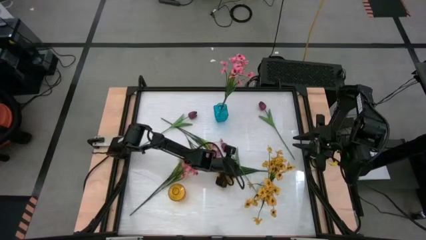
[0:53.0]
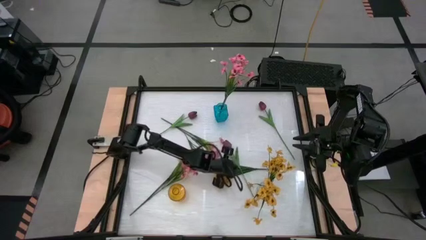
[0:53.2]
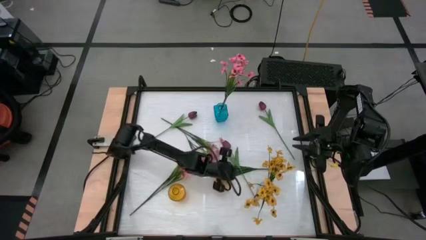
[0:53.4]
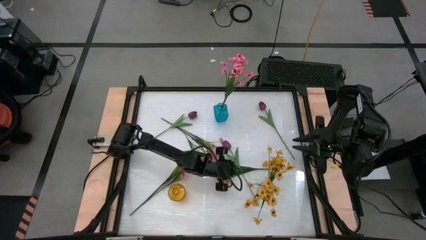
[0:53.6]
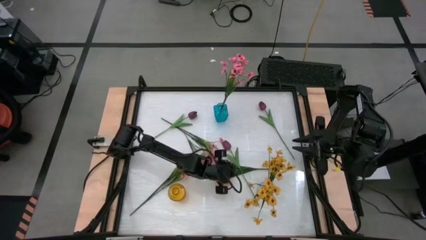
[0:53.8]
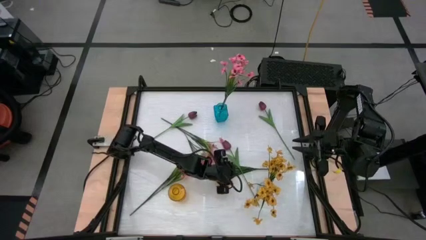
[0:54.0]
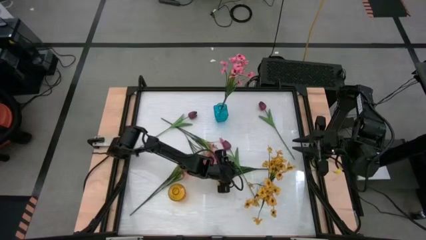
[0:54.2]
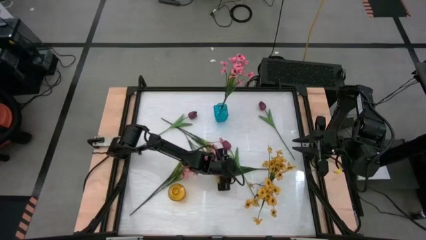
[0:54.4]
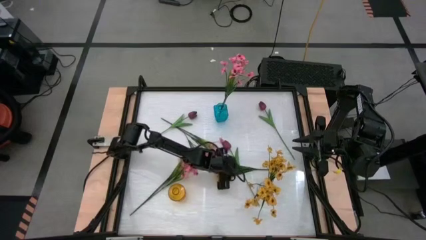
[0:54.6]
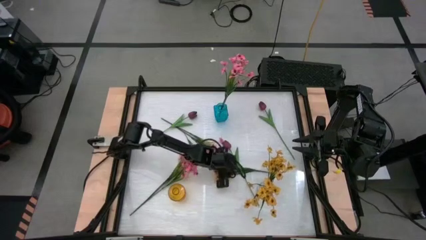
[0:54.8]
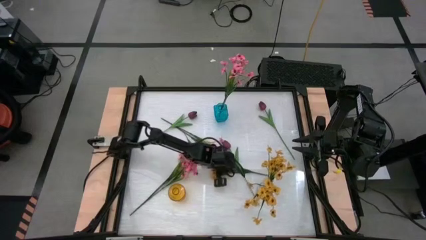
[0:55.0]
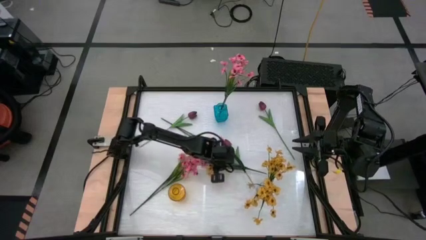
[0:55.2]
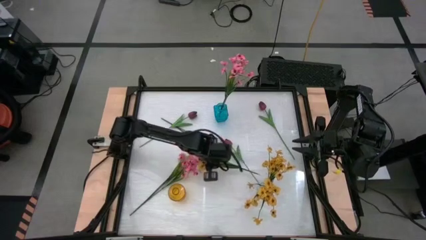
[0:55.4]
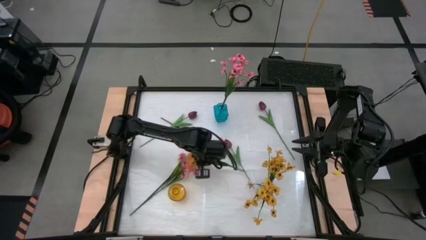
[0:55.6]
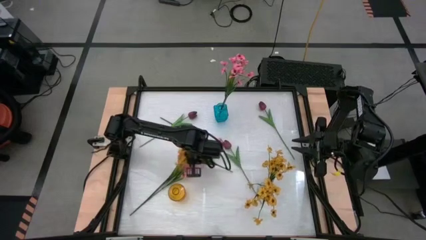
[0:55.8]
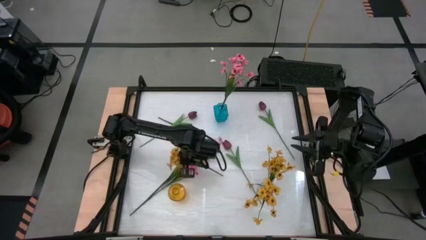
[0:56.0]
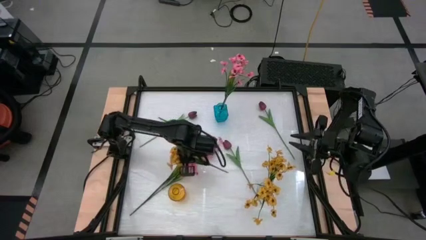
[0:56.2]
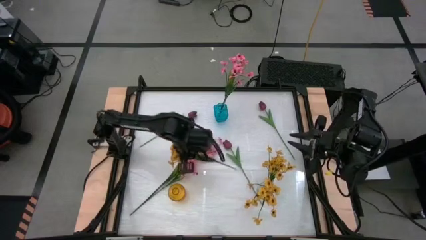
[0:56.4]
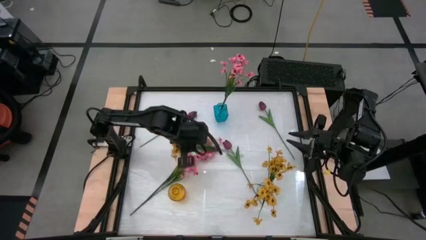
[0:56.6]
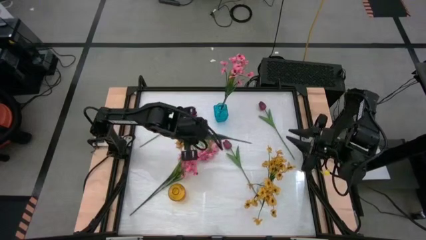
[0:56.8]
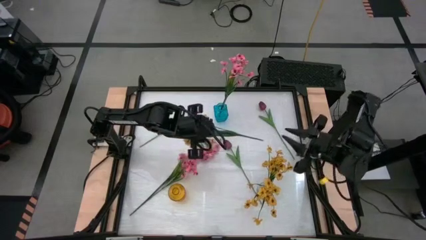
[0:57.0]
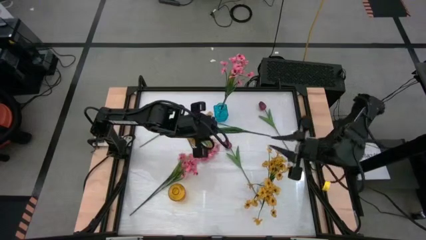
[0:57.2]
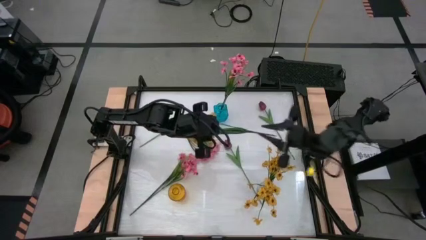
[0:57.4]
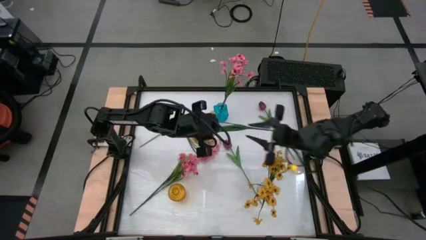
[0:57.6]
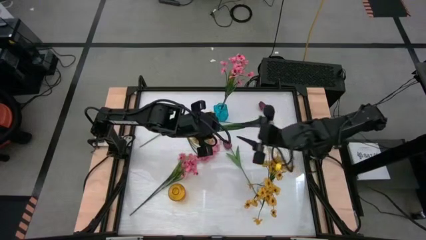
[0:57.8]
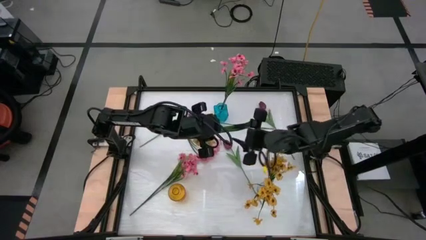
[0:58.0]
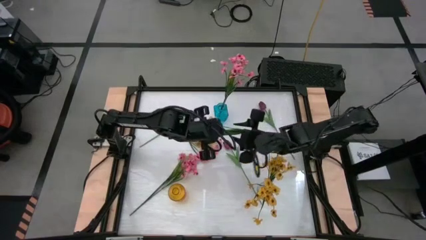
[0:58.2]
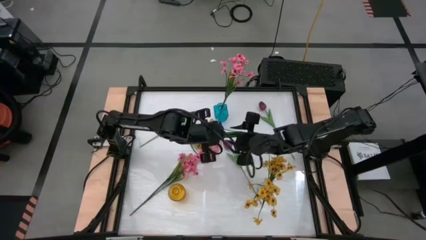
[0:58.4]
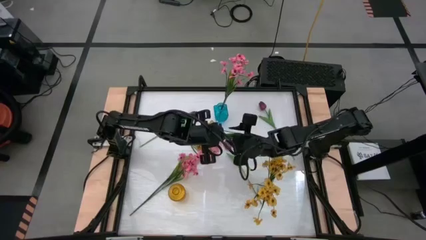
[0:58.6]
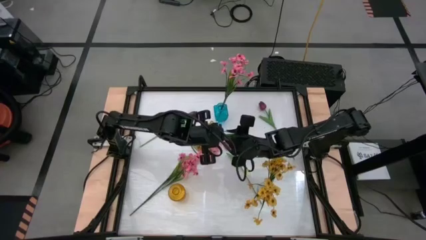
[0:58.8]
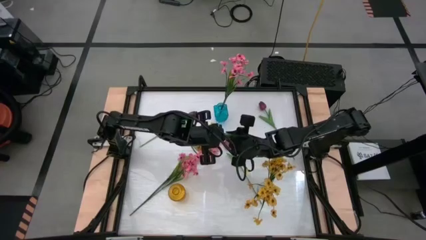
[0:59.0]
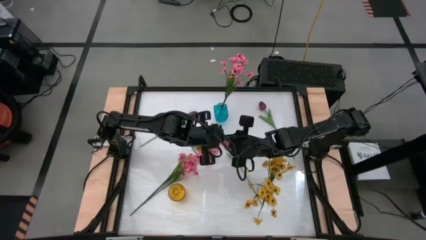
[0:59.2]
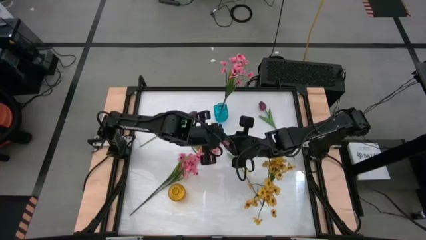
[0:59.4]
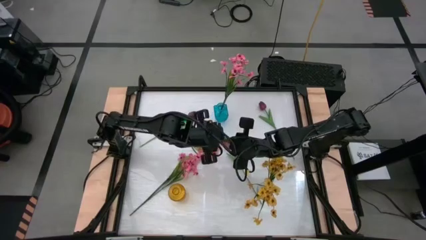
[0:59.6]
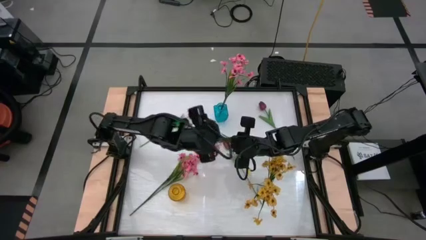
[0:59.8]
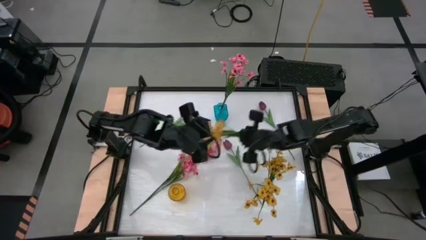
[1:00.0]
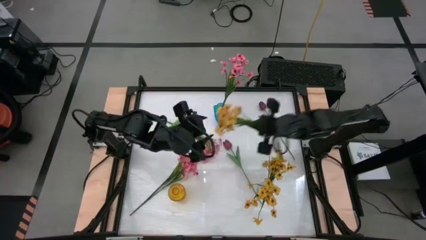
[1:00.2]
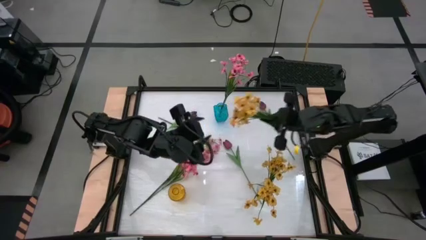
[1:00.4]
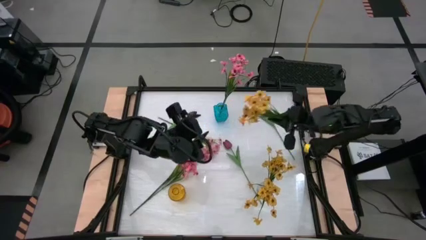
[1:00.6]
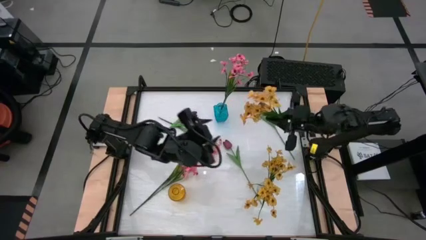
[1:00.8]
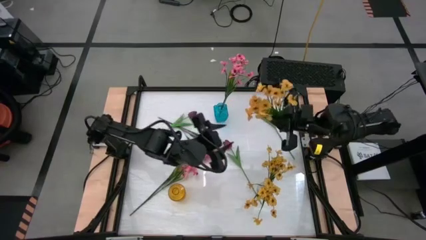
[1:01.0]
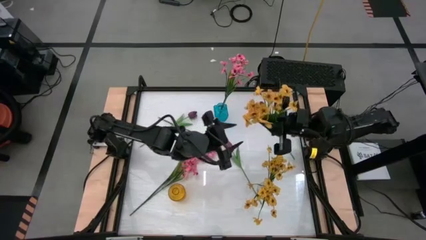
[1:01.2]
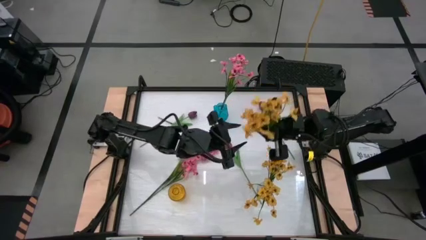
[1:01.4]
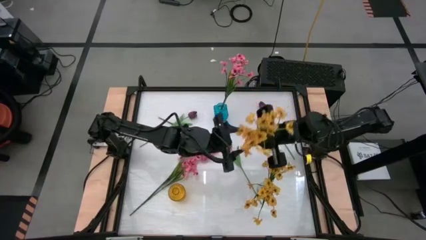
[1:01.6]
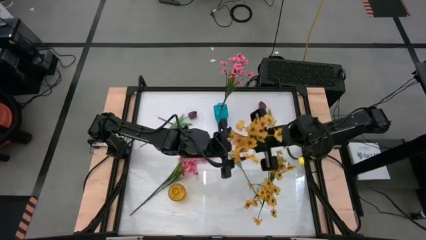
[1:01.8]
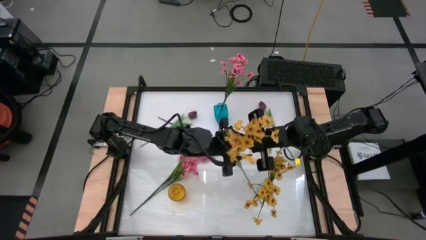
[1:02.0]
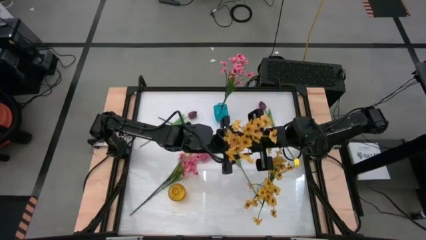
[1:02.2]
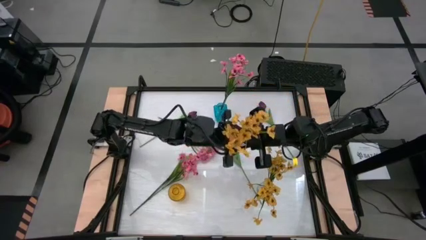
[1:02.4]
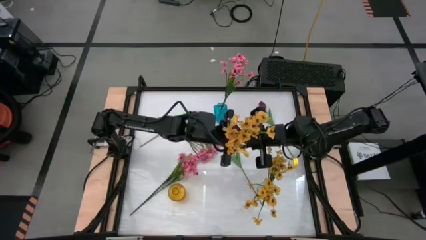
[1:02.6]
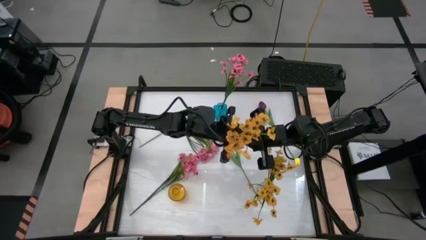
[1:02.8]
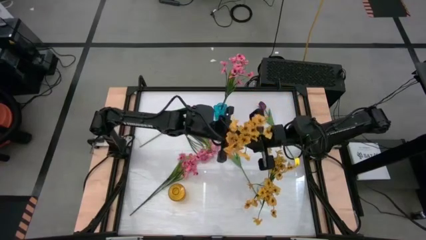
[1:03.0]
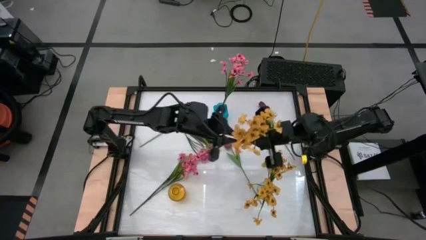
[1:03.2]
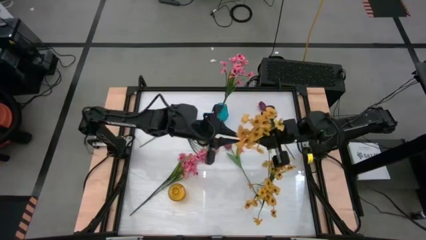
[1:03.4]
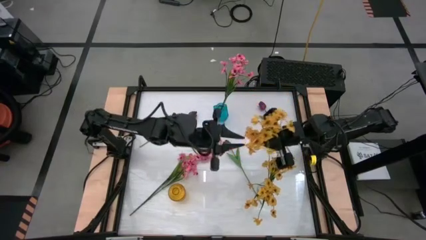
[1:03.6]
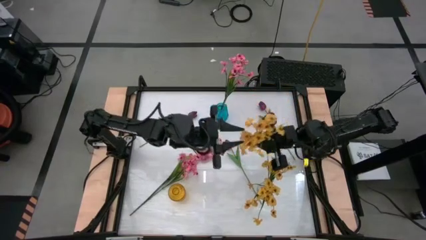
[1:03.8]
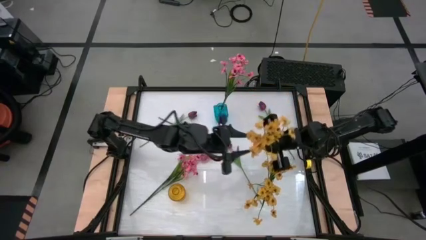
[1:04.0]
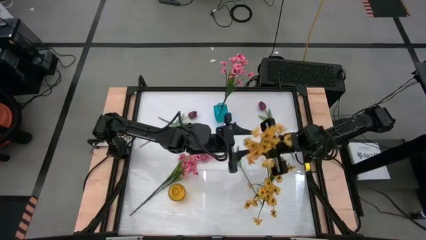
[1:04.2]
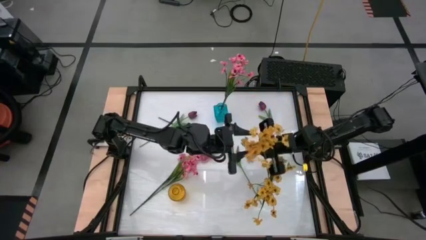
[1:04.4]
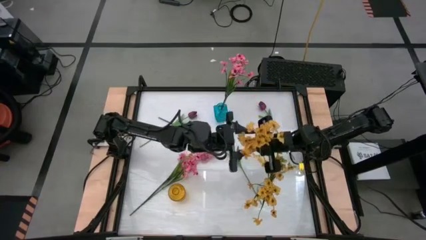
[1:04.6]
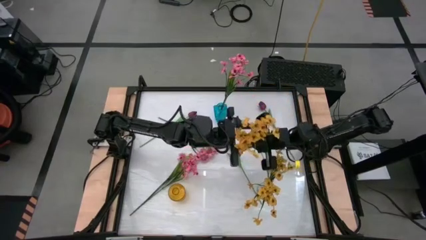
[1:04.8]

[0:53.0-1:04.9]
Task: Sort flowers into vase by color
Put the yellow flowers into the transparent vase

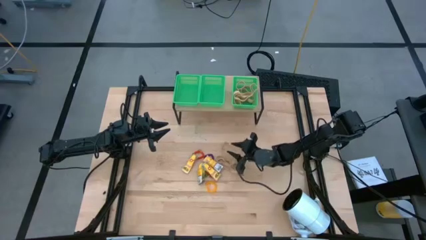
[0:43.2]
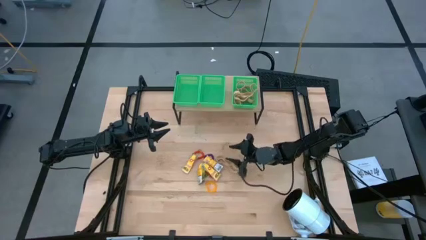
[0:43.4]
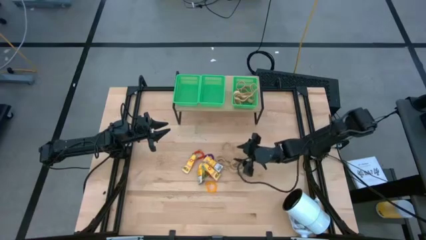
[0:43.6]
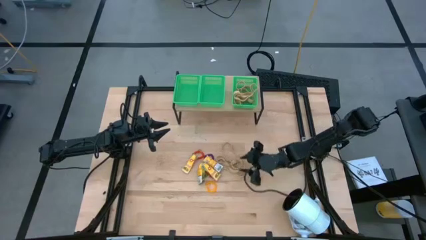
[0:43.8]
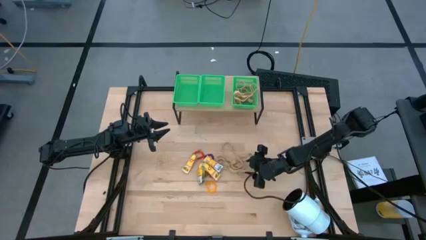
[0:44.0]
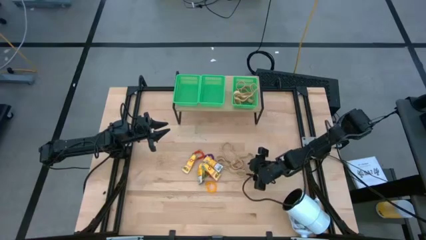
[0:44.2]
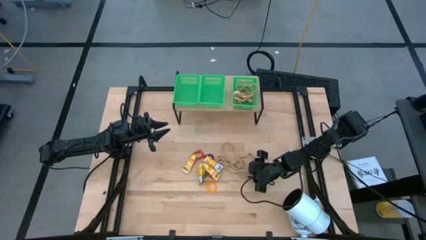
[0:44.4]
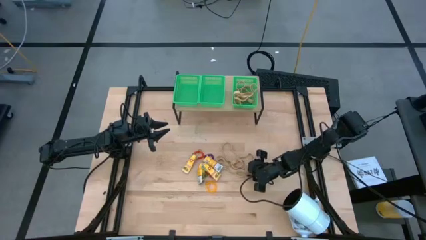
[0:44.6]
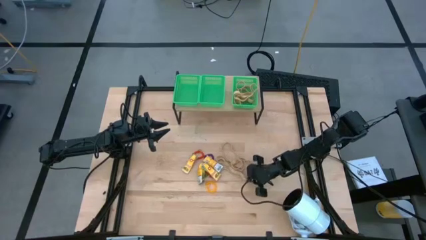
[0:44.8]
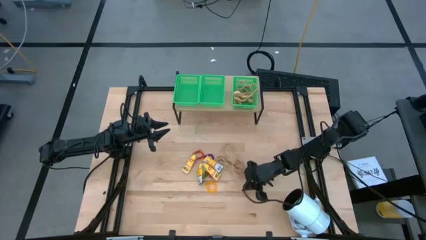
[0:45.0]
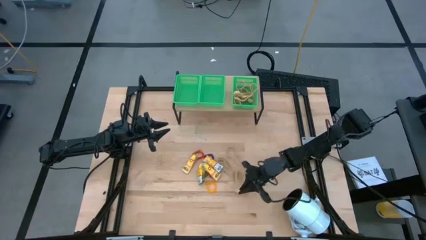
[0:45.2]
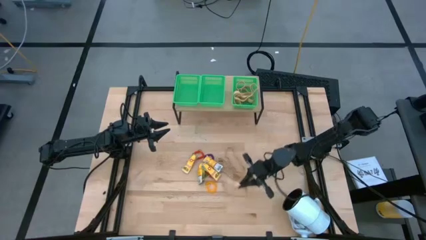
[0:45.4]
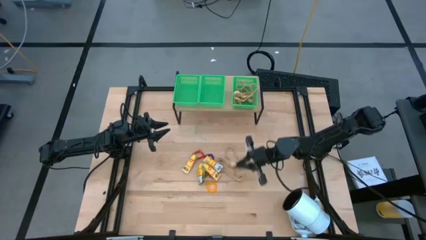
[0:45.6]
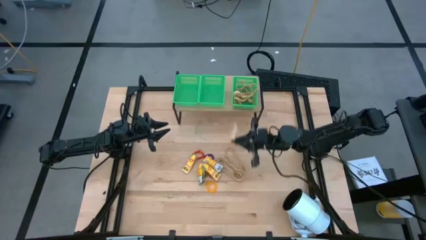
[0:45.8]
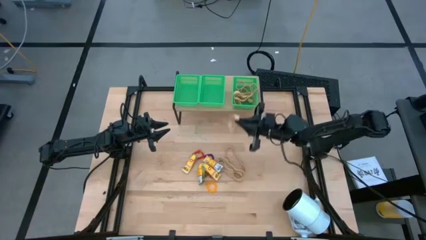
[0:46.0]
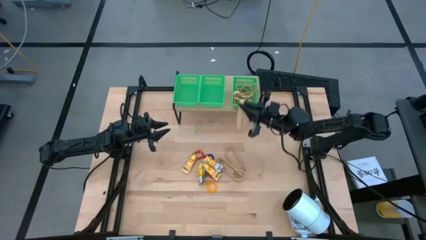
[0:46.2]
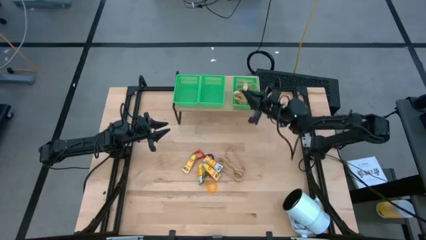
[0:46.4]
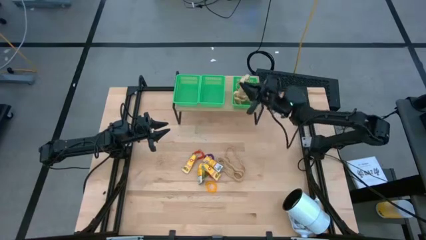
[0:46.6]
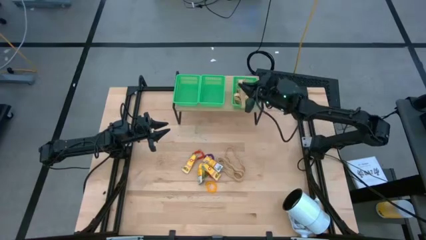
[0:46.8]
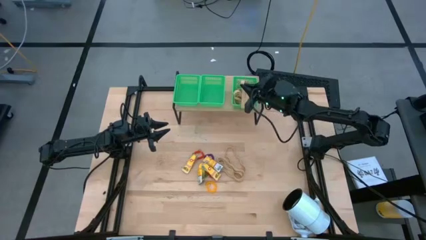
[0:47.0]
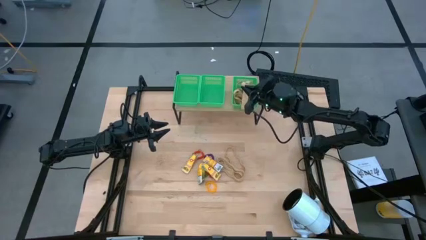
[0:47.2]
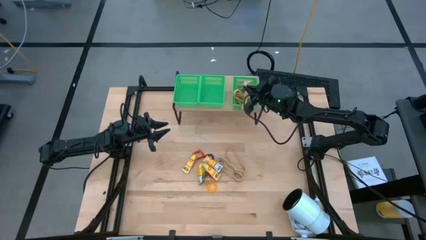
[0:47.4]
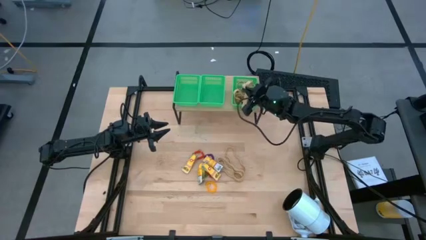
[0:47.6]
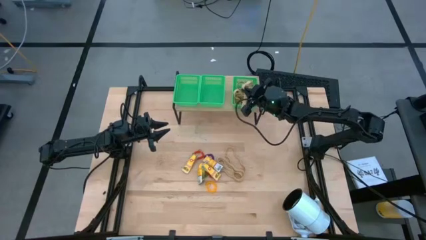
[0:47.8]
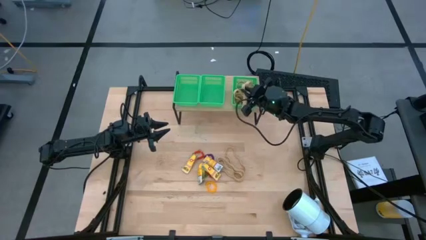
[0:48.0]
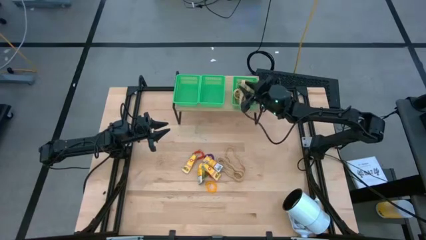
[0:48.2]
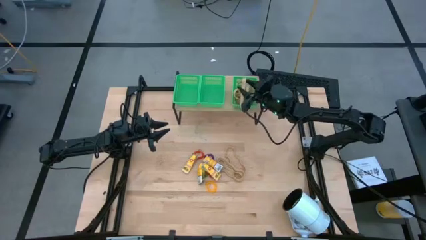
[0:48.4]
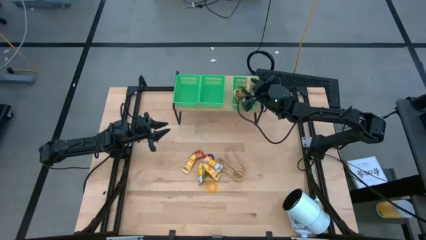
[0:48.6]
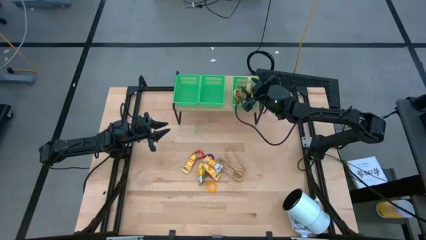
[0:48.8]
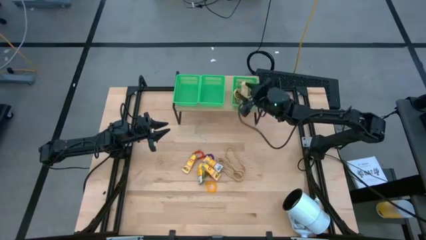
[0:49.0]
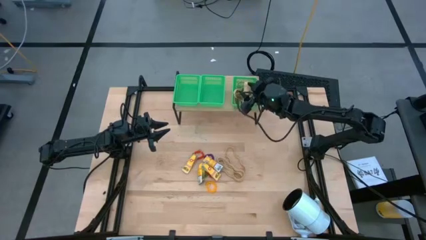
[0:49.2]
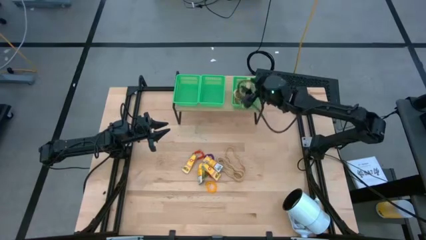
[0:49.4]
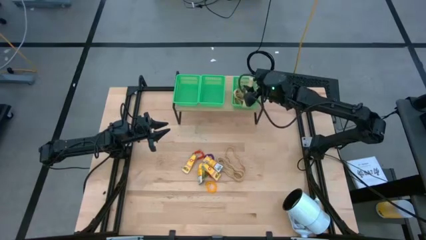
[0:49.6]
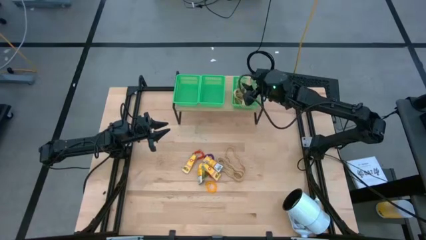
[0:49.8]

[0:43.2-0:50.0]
Task: Pick & Place Office Desk Supplies
Put the brown rubber band into the right green bin on the shelf
